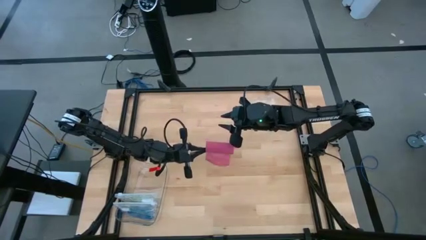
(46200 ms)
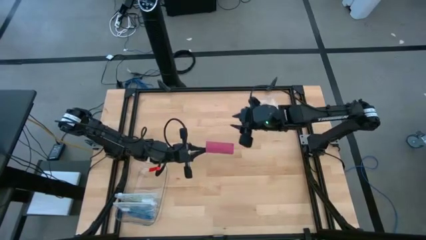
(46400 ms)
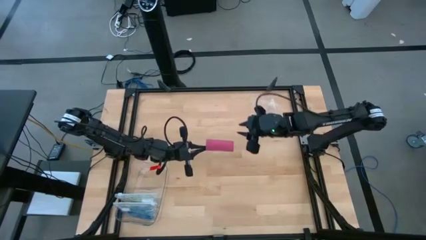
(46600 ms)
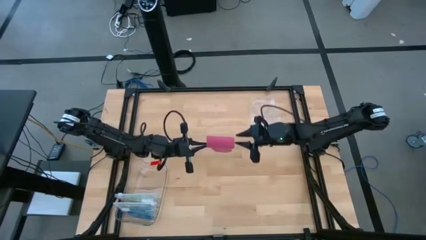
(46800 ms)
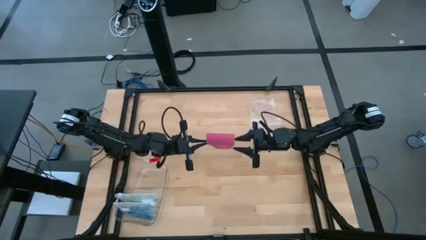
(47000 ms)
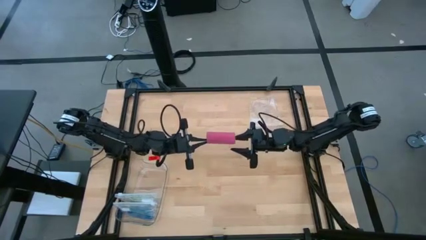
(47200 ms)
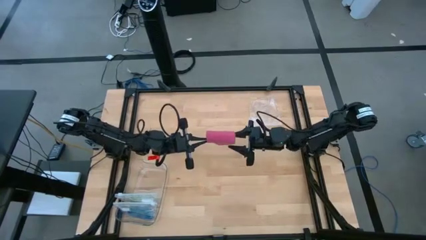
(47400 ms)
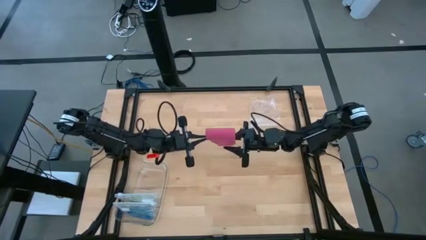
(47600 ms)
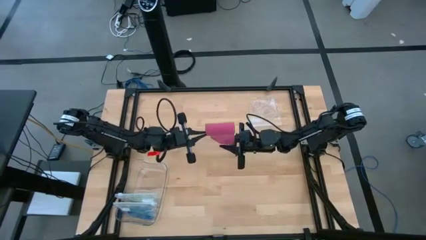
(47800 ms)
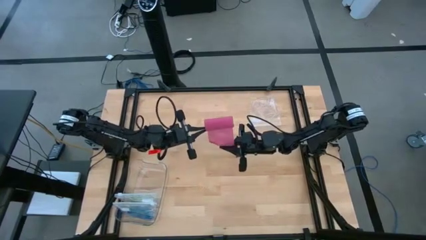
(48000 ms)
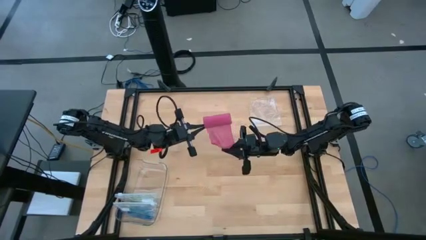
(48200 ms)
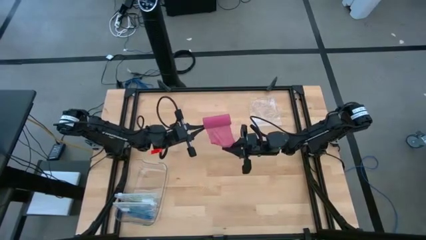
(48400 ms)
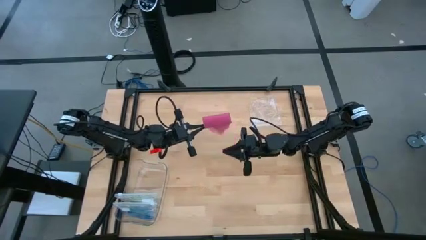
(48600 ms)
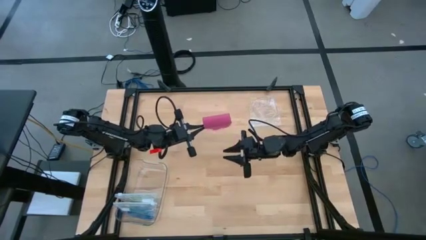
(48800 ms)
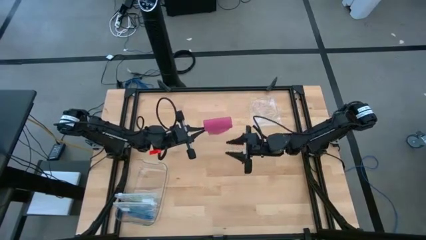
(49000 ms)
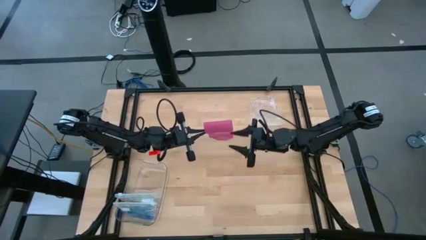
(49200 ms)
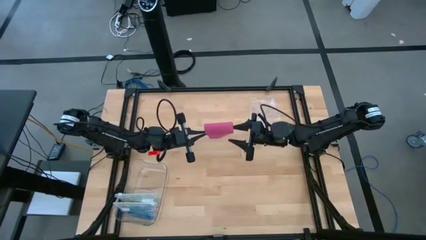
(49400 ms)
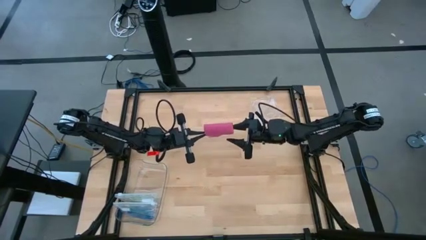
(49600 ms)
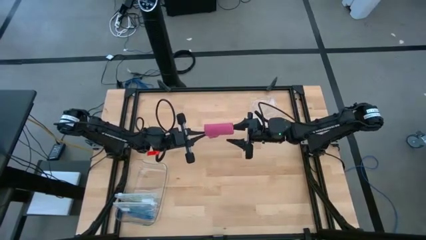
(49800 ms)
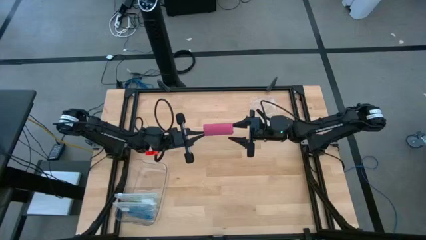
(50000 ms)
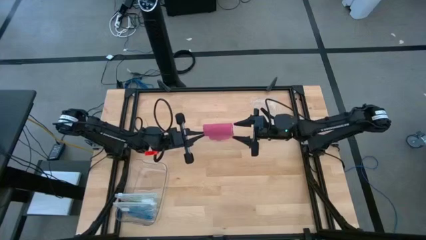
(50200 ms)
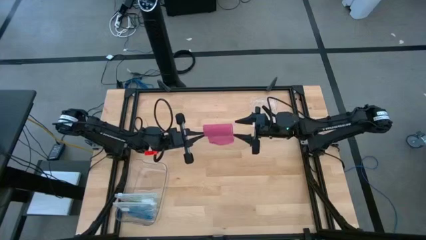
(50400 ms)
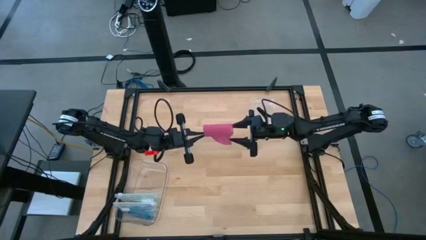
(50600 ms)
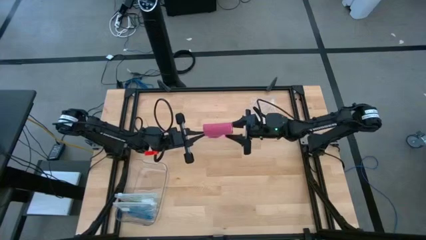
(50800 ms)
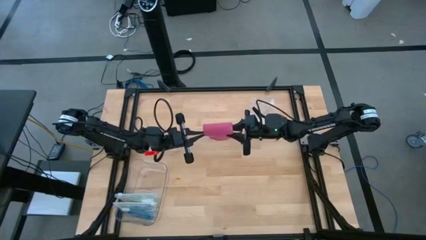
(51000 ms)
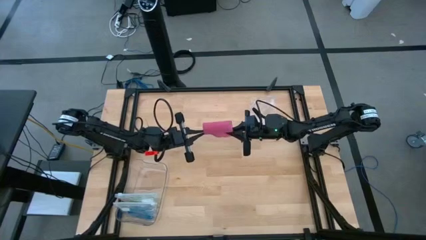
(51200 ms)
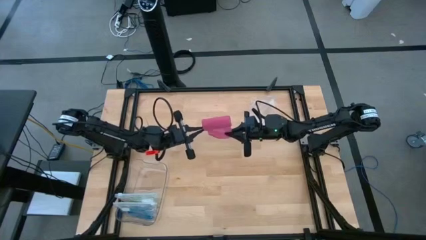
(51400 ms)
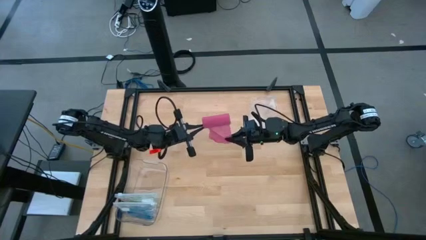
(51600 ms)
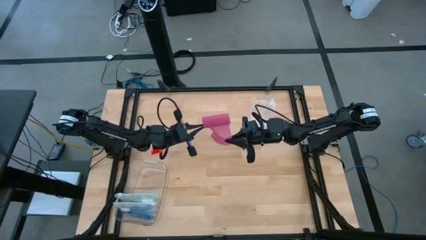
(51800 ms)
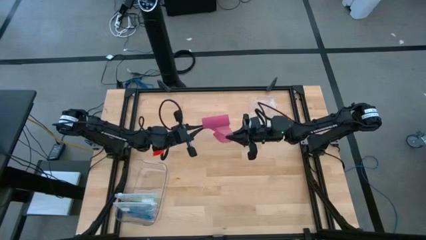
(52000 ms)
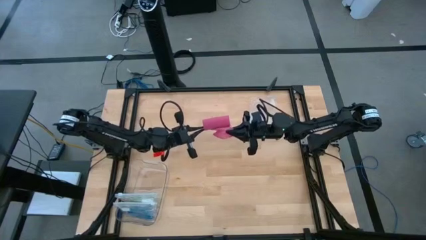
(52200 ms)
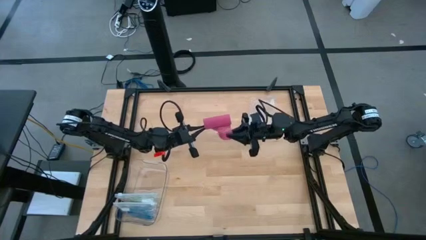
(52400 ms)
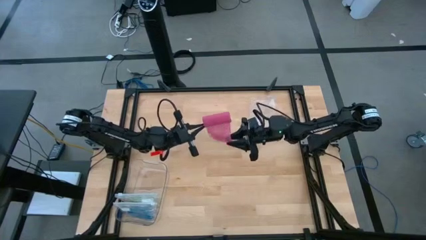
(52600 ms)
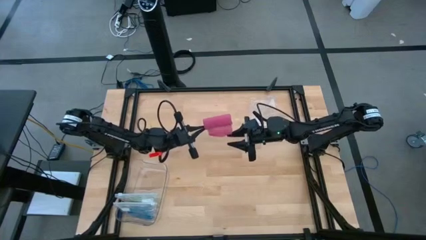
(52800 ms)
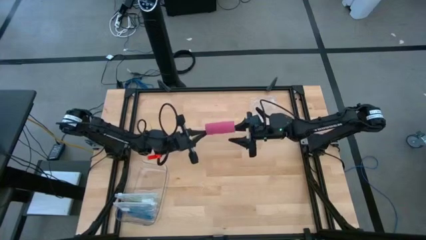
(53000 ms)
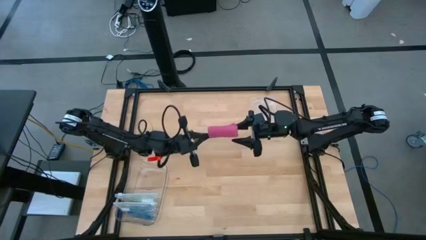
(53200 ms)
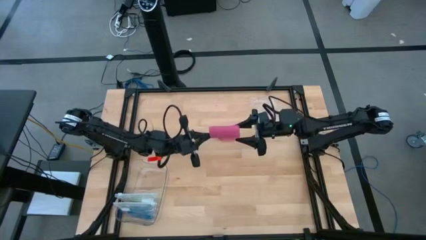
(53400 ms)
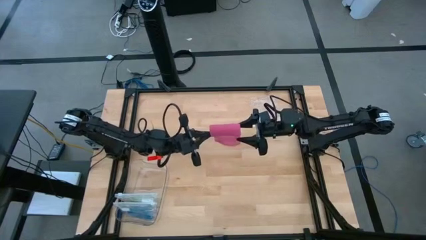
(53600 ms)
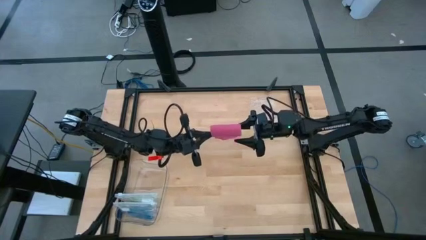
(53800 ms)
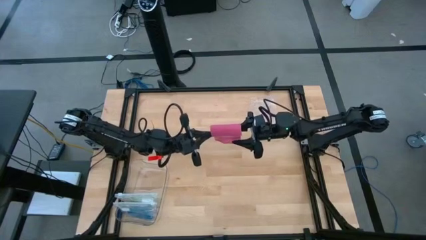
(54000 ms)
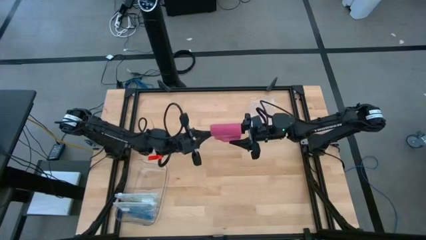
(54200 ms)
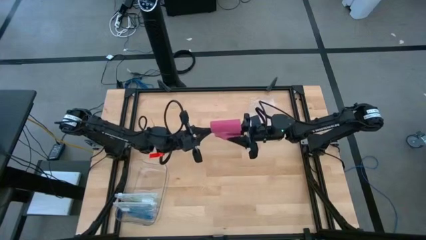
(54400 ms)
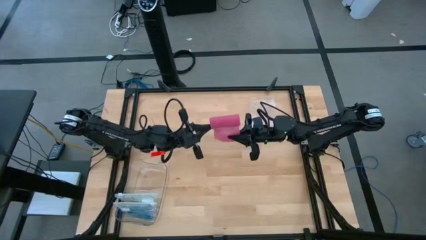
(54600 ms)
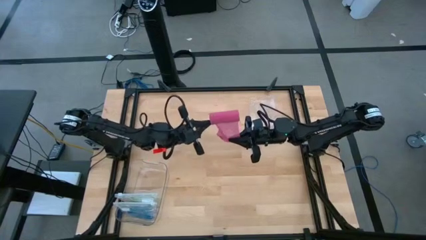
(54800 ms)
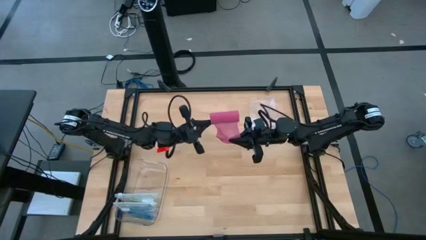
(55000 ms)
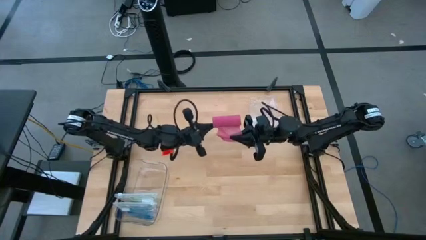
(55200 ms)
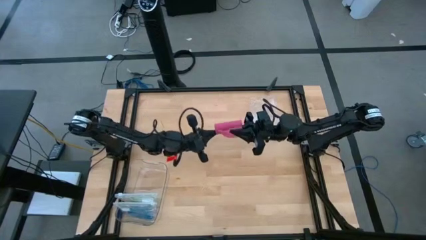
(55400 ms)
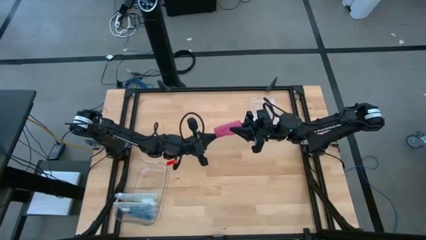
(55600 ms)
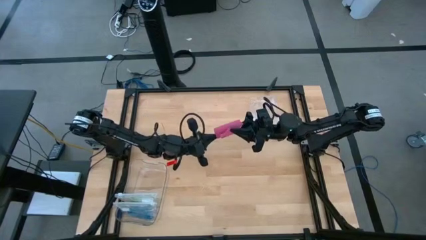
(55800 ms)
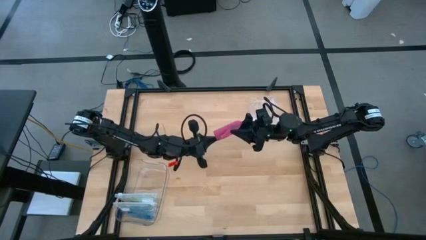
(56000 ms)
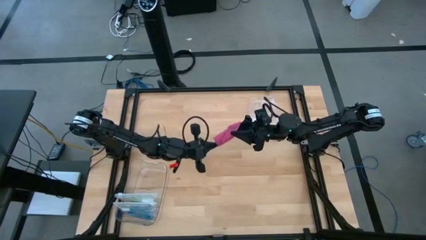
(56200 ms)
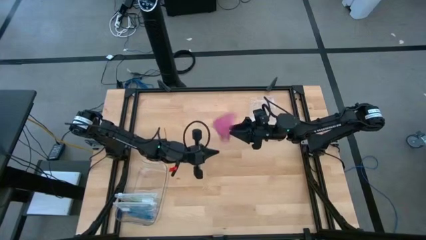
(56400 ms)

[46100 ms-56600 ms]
Task: Roll bandage
Roll the pink bandage

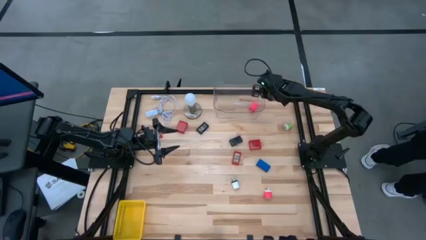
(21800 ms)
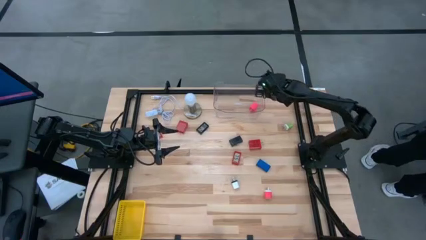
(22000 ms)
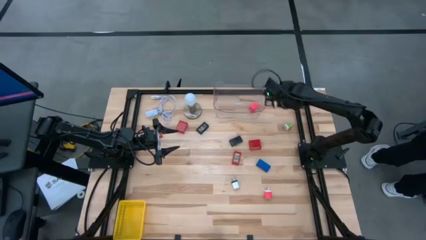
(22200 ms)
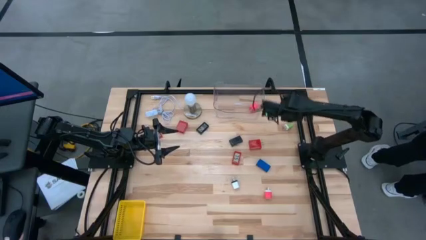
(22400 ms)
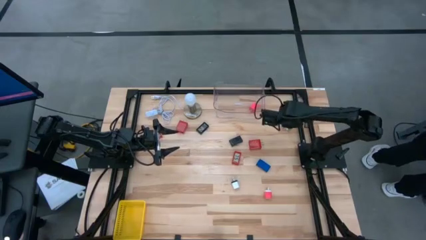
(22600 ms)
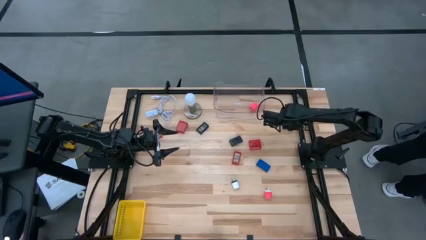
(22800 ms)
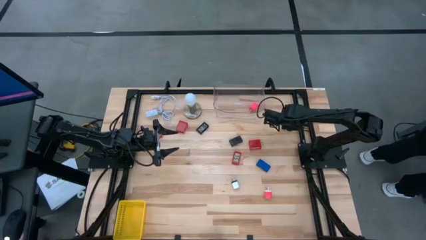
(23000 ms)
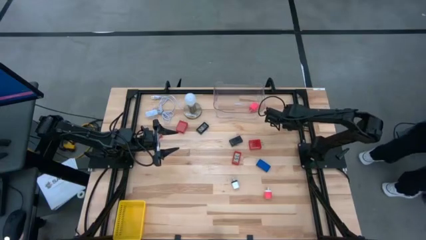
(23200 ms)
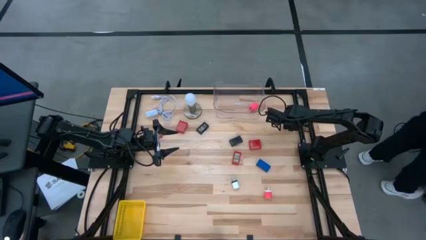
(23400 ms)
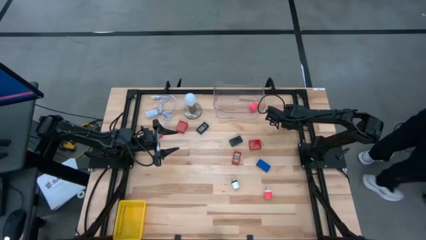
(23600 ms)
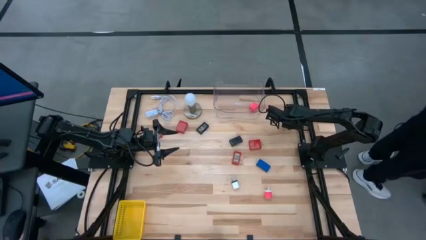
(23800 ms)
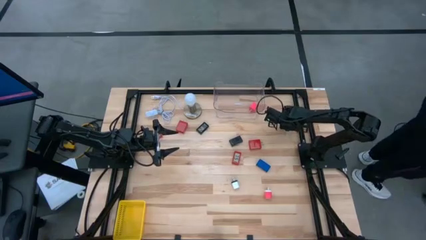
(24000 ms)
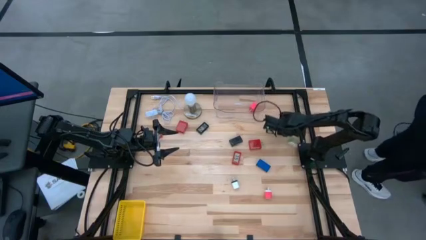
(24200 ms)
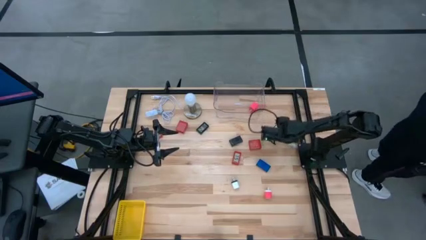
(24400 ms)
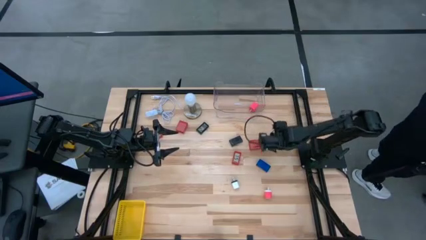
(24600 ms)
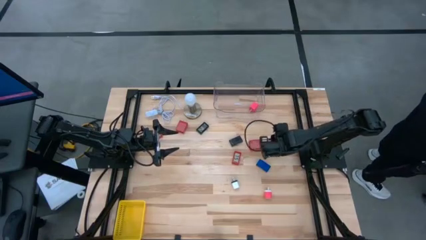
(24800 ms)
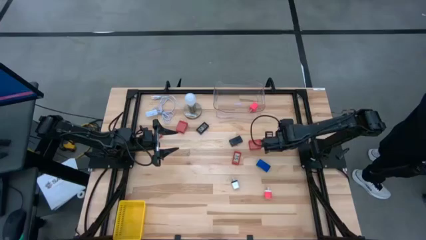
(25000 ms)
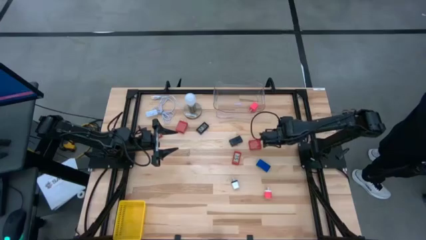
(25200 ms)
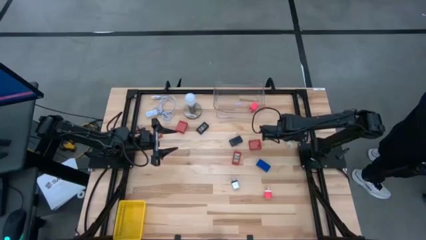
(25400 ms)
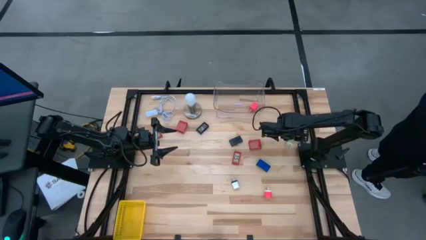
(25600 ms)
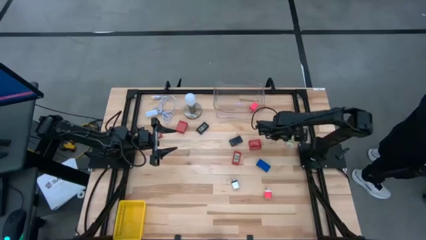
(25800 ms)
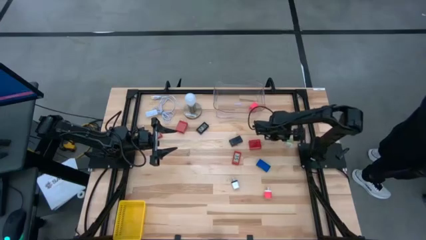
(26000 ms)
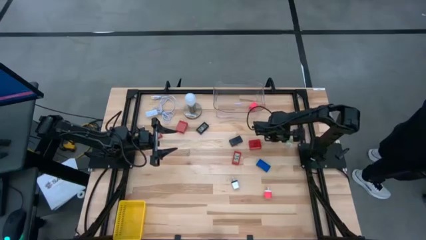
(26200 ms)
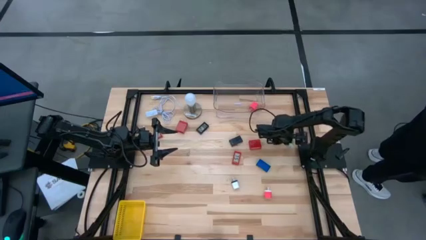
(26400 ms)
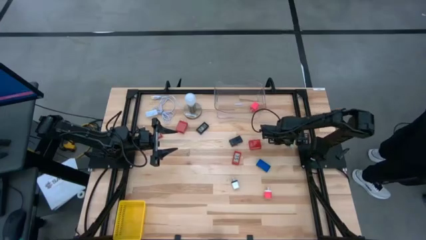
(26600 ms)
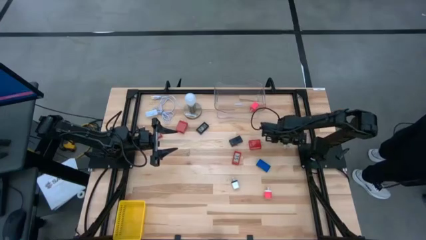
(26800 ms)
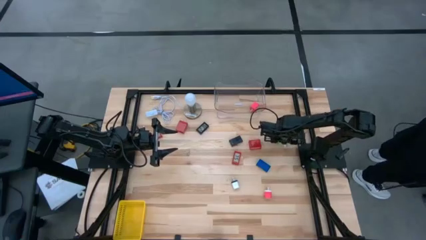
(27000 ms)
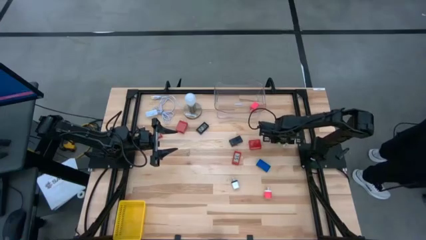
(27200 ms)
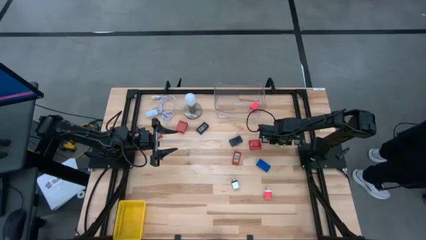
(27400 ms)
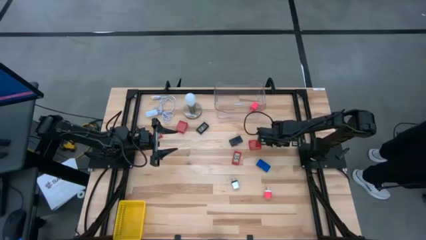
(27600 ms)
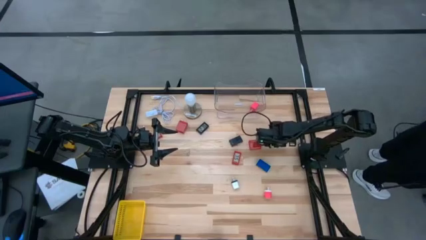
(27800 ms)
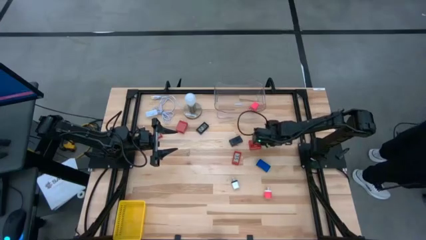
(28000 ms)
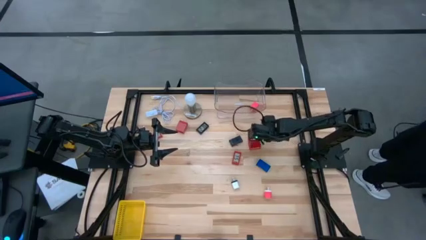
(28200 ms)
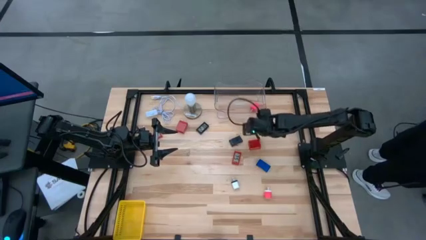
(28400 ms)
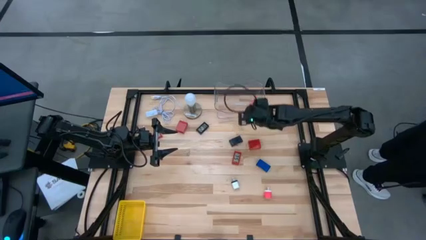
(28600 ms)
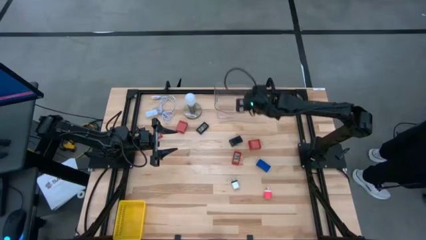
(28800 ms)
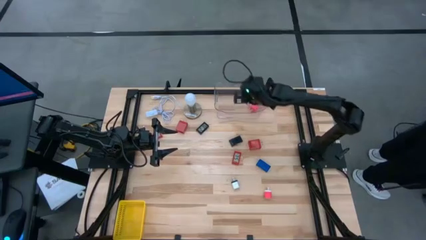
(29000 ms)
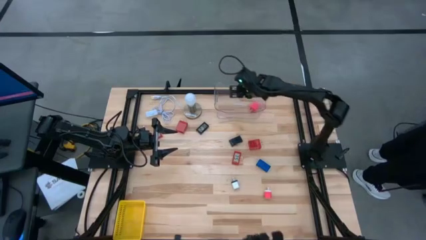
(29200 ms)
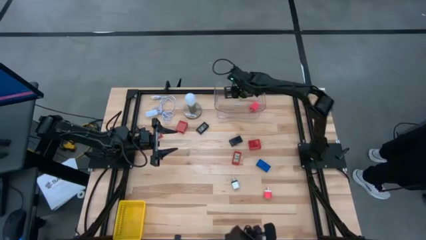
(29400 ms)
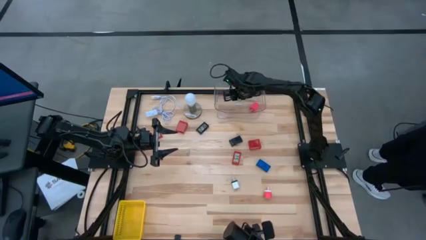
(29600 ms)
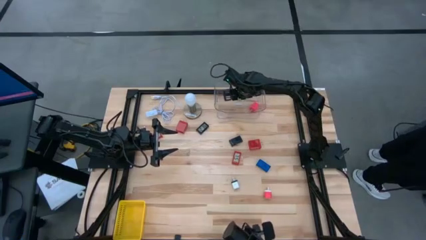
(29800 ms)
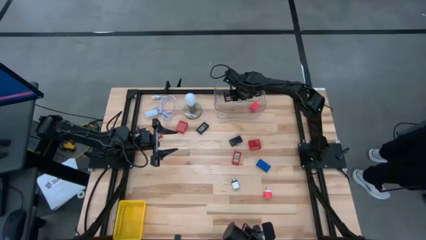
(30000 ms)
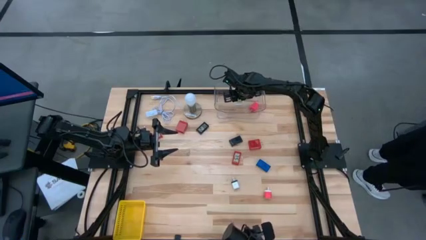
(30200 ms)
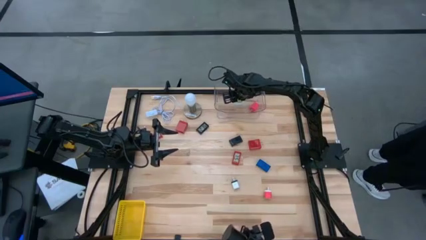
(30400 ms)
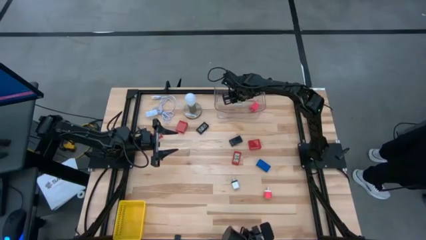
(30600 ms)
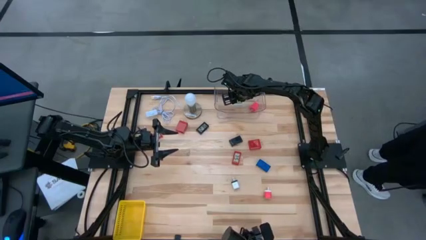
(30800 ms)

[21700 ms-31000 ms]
Task: Pick & Place Office items
Put the green charger adapter into the transparent bin
